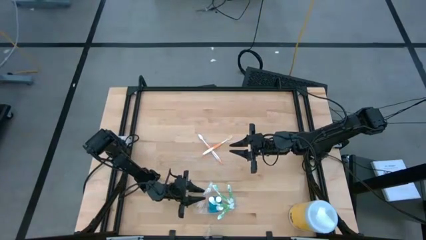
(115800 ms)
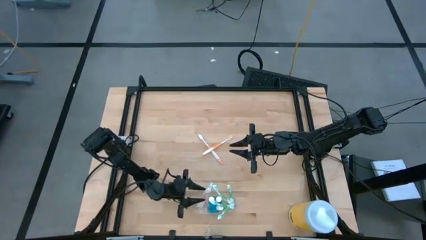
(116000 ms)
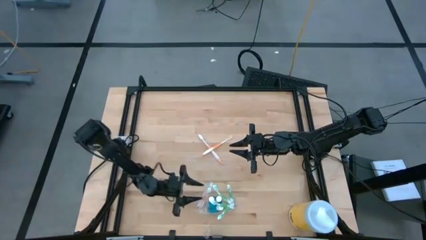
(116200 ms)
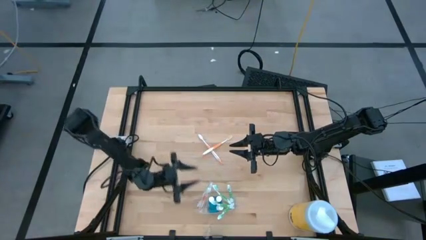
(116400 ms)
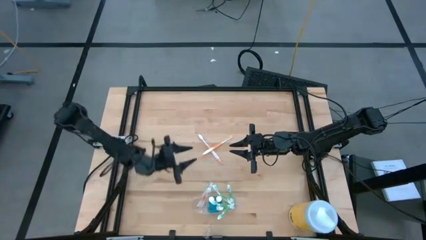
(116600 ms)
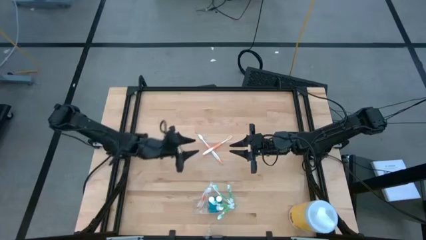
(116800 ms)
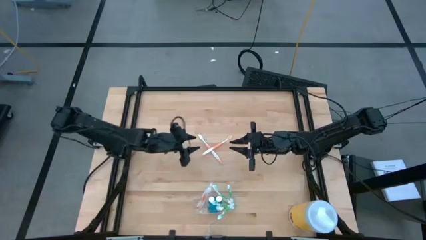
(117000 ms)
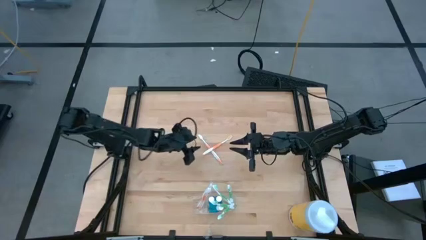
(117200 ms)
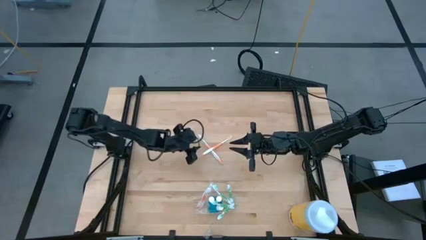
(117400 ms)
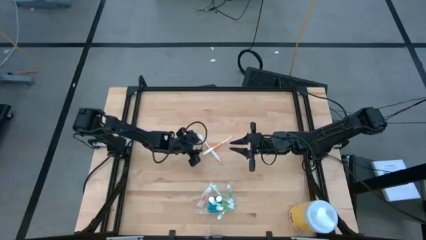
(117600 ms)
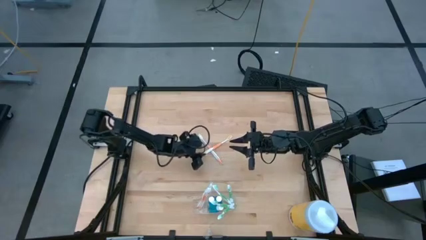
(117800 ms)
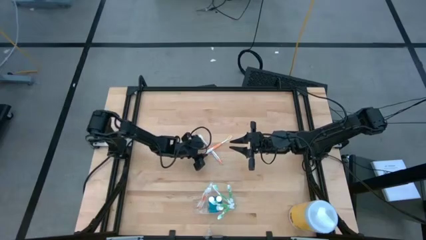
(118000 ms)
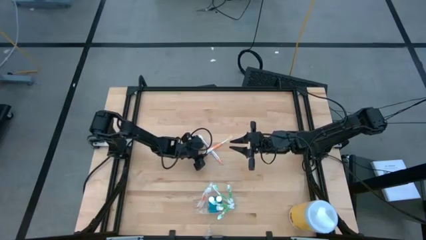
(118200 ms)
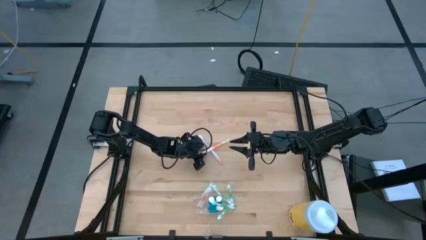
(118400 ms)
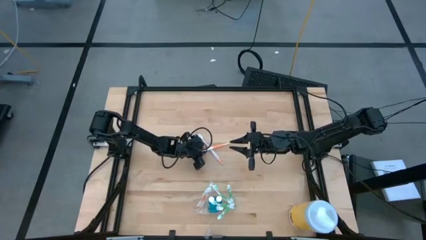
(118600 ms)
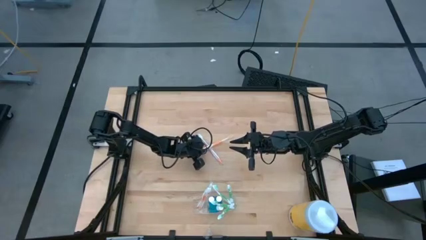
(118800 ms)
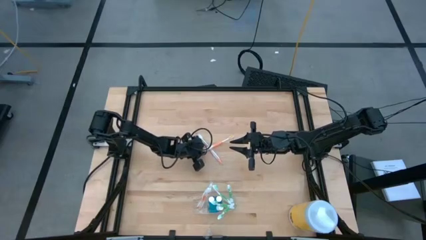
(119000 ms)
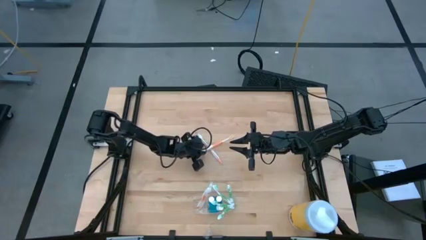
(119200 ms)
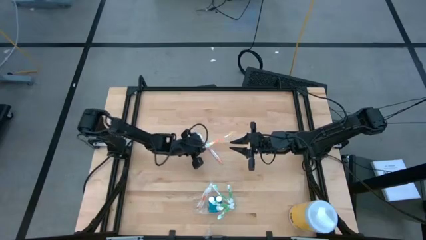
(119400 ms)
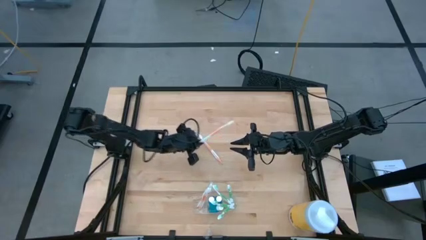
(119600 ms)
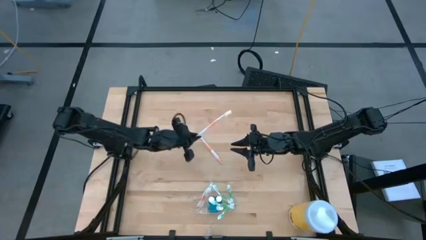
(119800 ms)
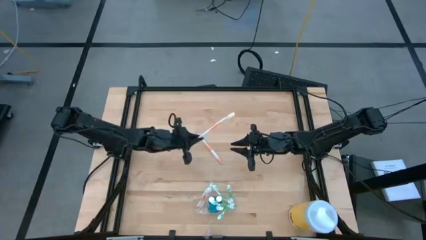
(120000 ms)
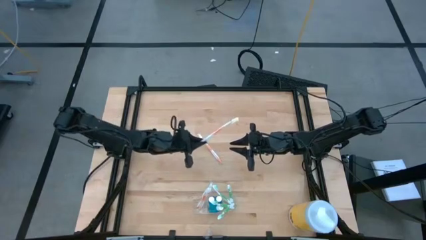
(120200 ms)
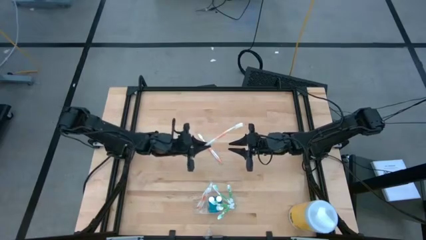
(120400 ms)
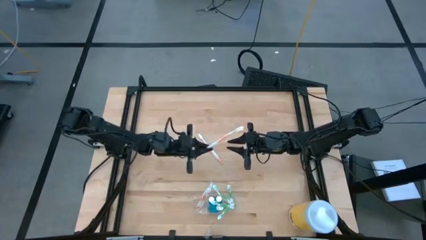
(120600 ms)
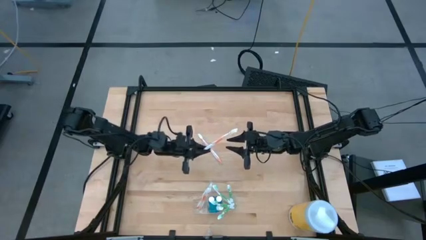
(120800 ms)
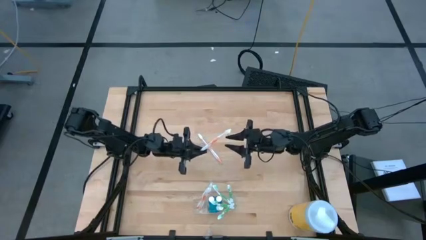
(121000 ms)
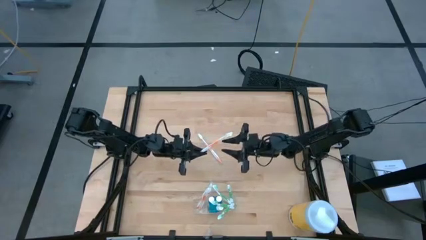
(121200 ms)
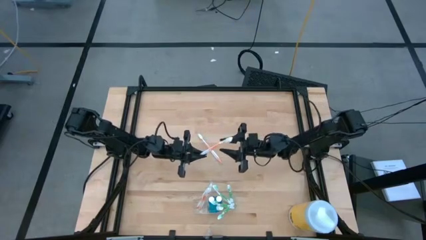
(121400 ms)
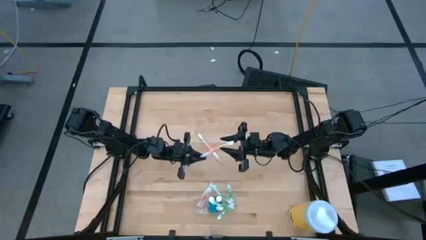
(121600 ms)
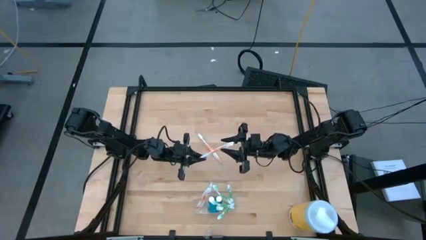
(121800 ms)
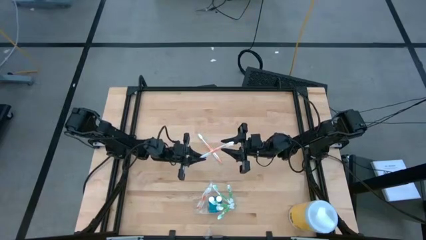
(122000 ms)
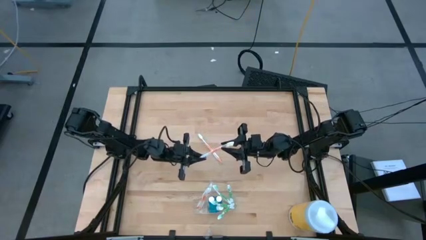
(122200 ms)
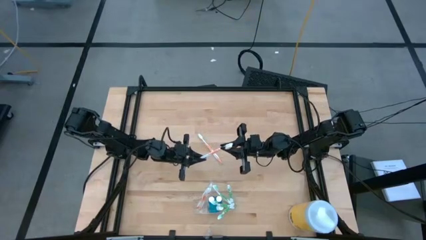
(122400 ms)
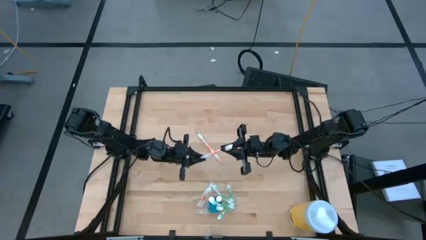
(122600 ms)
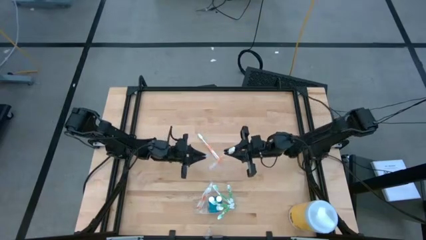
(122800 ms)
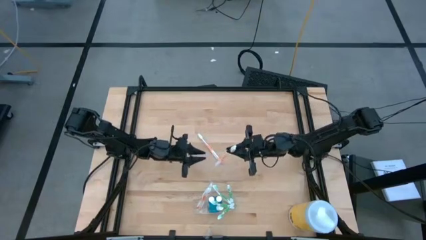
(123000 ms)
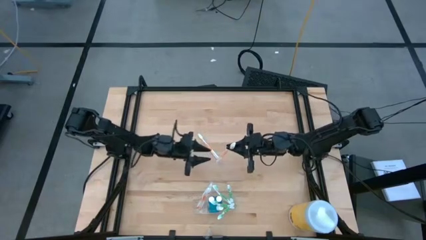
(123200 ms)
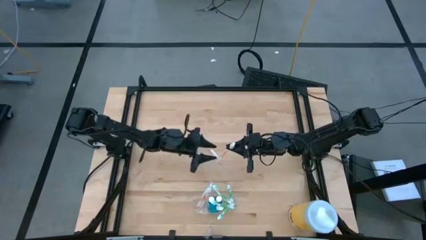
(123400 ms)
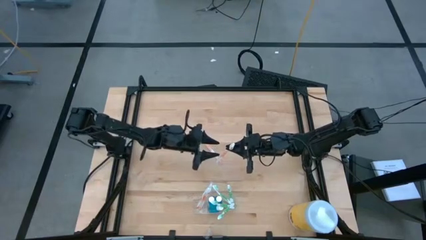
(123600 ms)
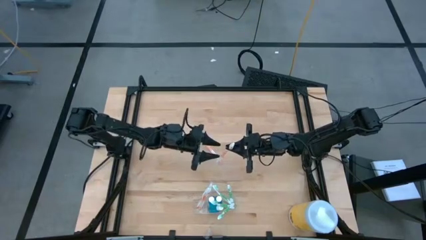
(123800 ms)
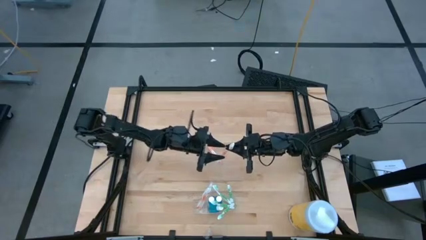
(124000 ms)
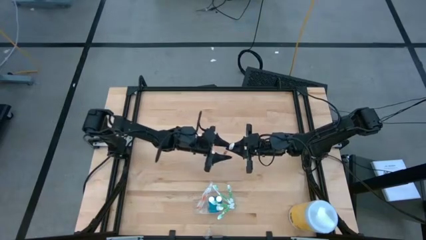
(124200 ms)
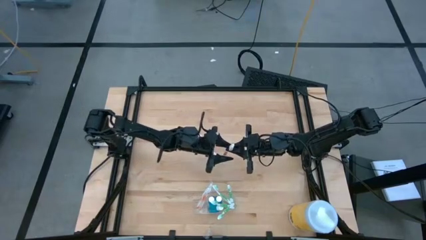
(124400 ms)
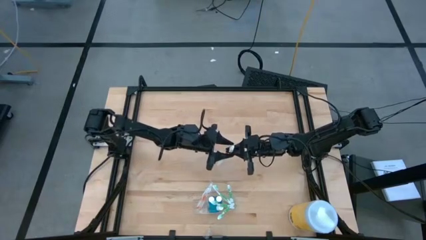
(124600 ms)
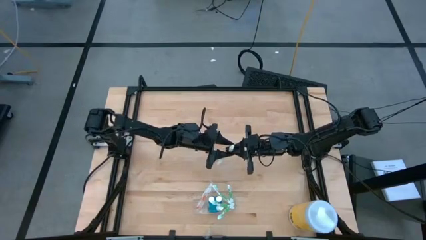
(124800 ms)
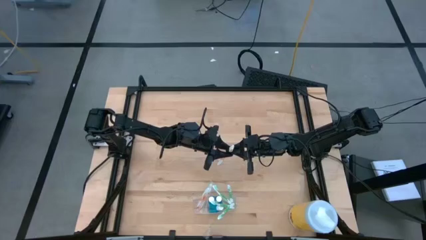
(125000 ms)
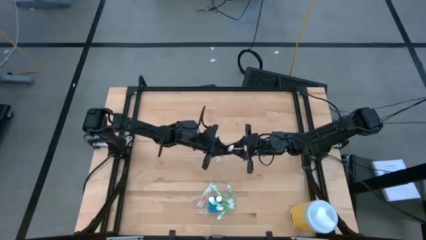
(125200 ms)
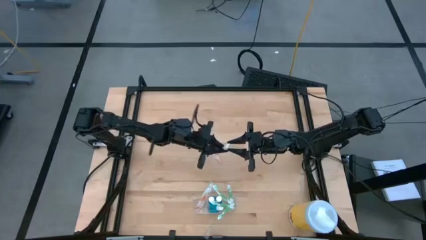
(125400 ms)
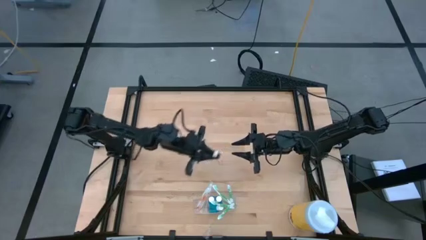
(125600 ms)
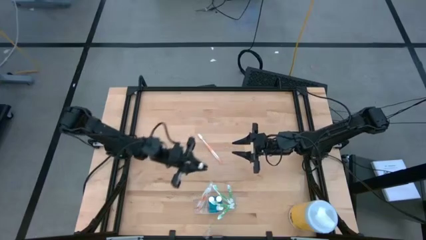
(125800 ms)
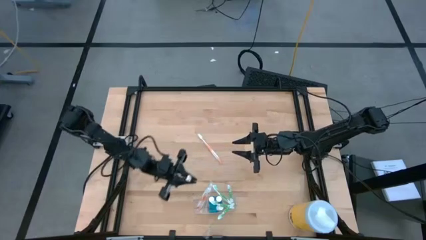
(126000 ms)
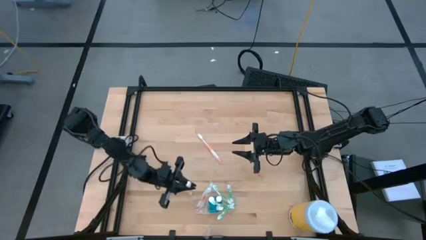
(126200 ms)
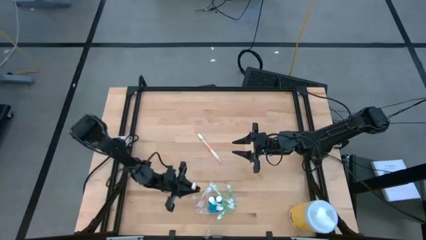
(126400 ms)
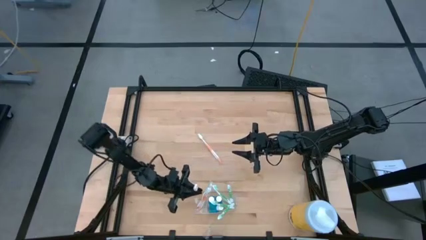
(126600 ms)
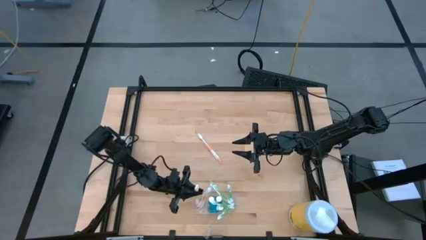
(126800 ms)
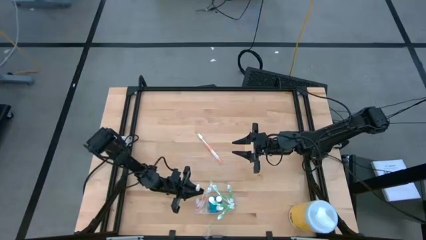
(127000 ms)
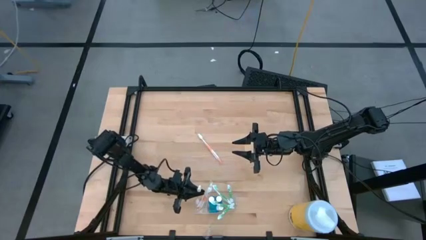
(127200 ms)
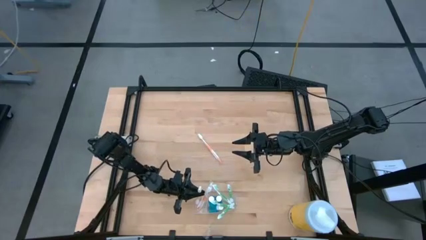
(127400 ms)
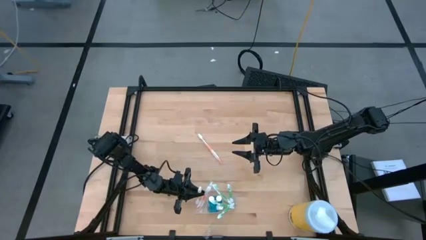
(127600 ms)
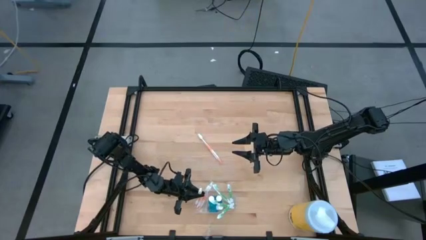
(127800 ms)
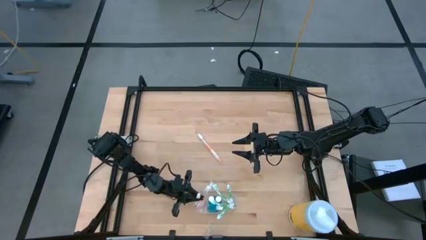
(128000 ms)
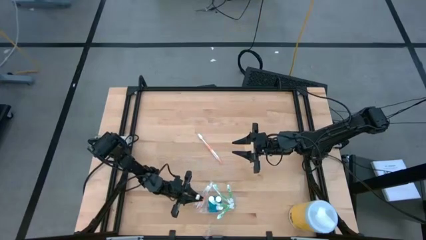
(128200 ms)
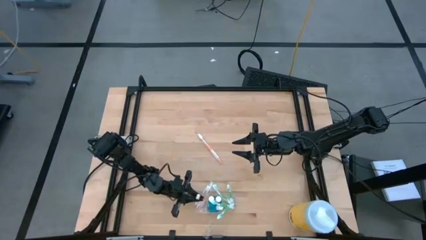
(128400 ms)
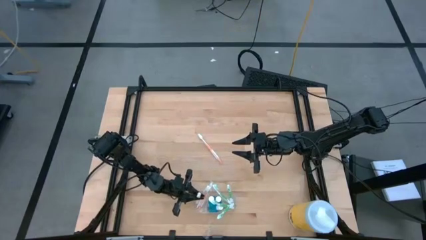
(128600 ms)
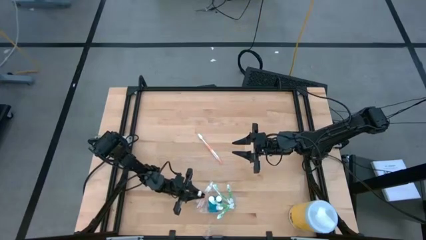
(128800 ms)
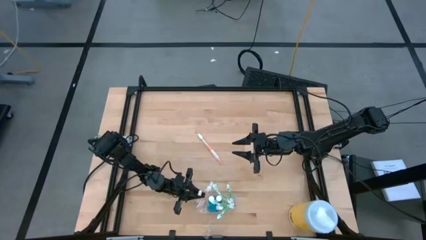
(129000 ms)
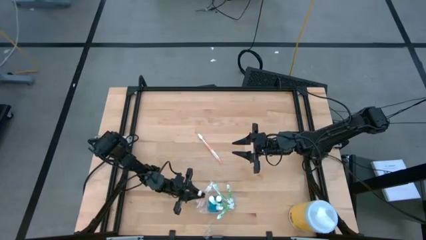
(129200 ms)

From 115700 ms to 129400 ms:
Task: Pick & Place toothbrushing station
Put the orange toothbrush into the transparent organizer
